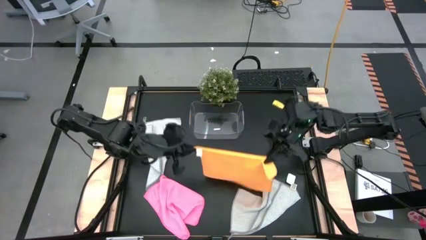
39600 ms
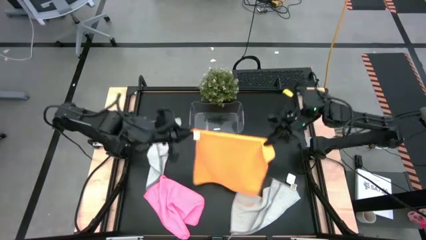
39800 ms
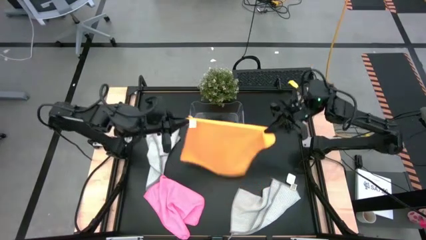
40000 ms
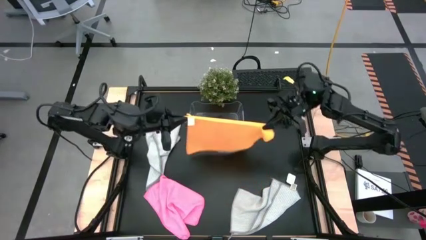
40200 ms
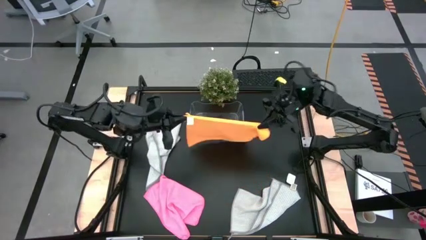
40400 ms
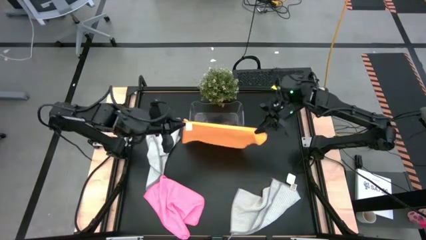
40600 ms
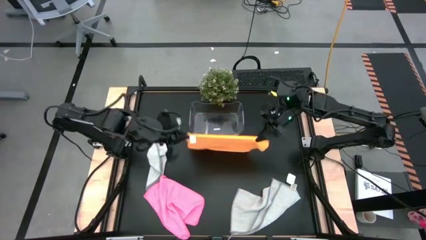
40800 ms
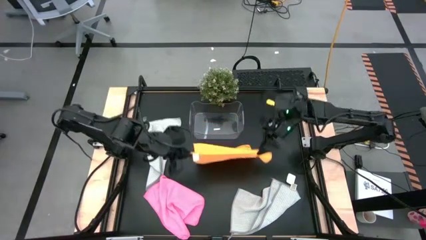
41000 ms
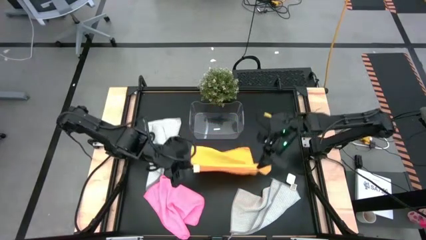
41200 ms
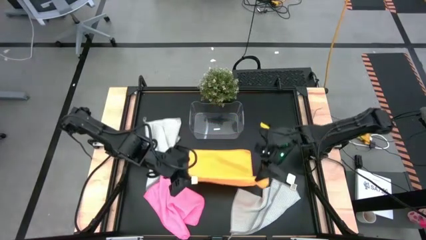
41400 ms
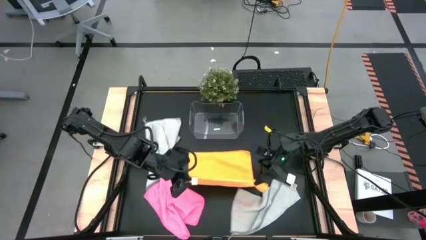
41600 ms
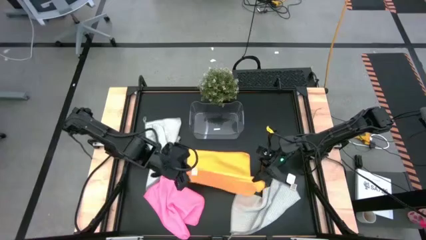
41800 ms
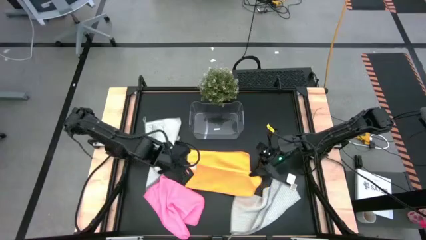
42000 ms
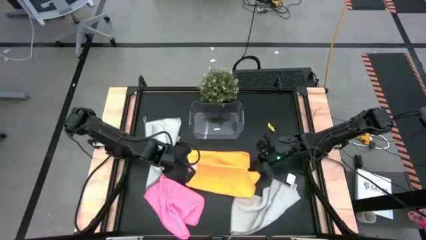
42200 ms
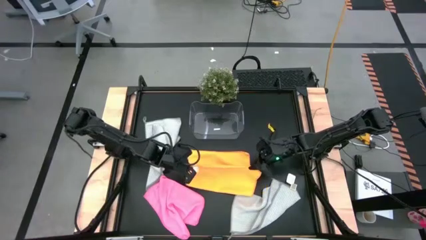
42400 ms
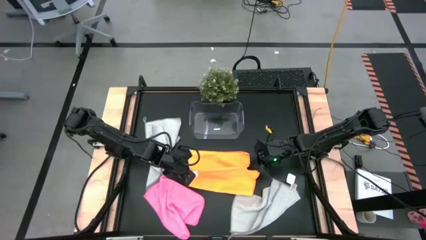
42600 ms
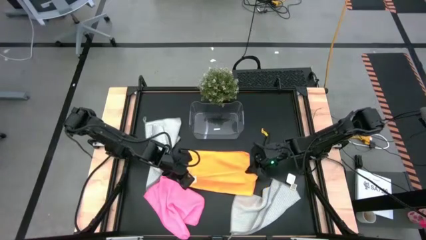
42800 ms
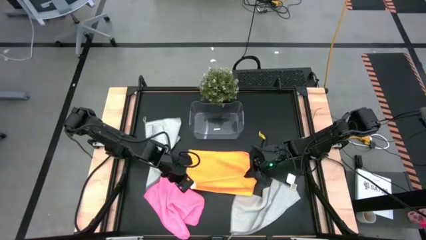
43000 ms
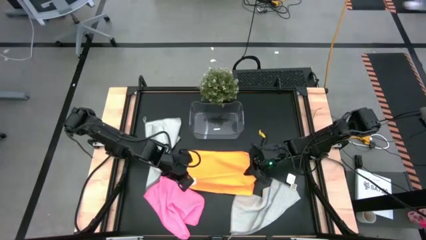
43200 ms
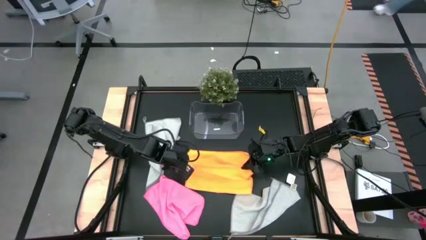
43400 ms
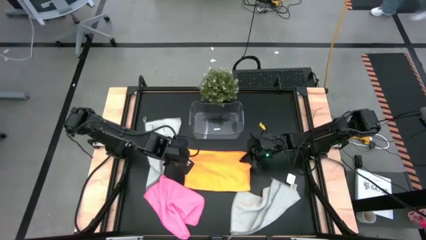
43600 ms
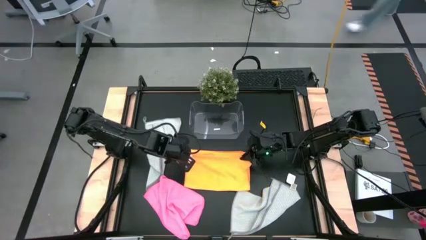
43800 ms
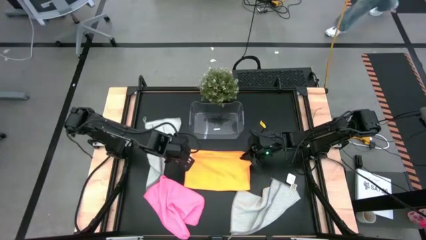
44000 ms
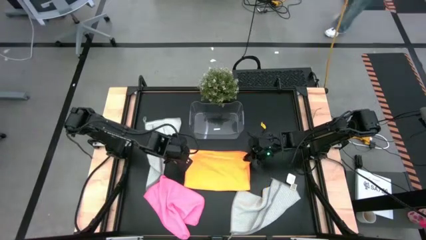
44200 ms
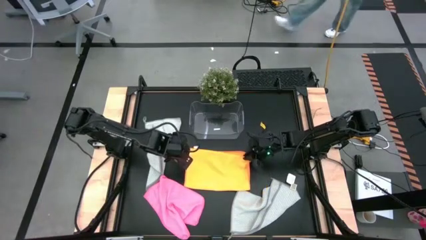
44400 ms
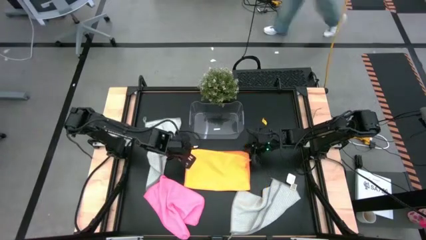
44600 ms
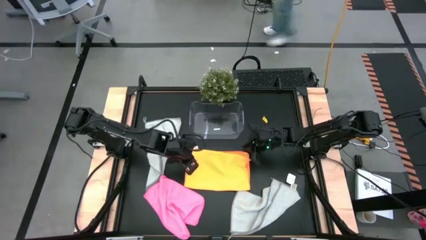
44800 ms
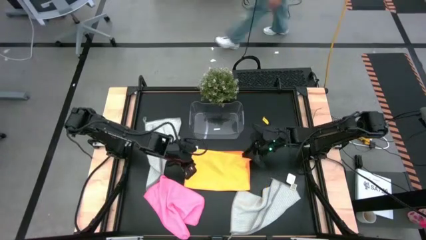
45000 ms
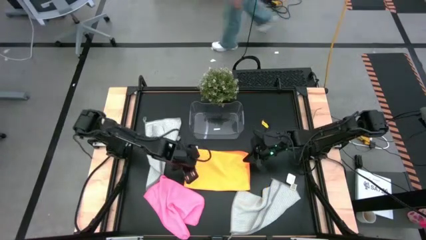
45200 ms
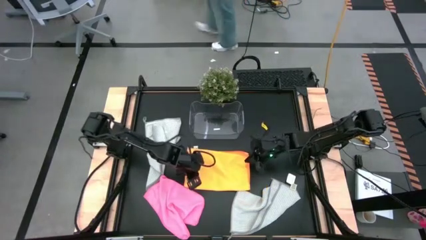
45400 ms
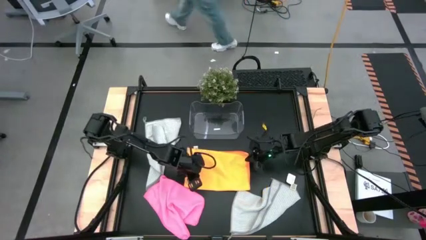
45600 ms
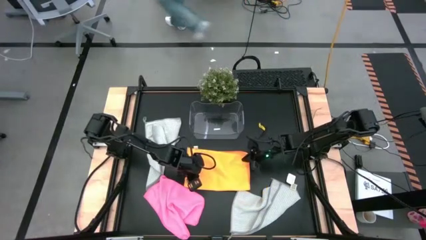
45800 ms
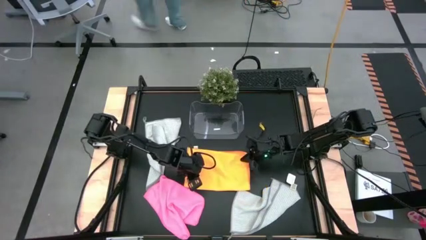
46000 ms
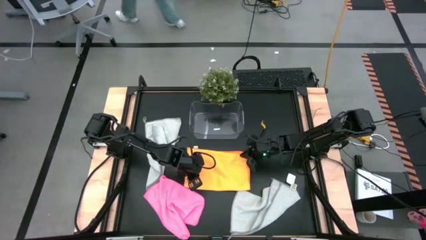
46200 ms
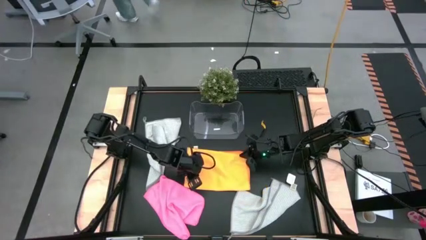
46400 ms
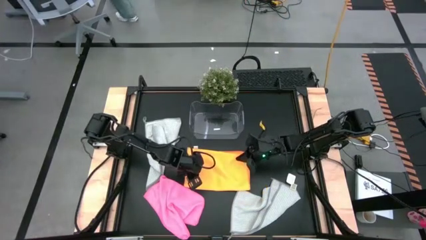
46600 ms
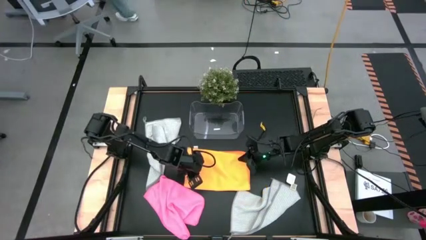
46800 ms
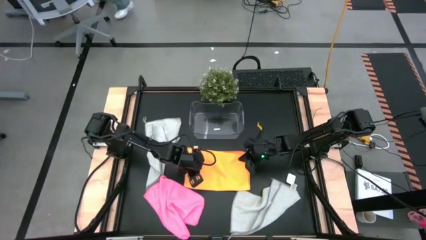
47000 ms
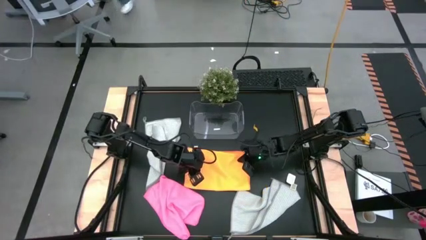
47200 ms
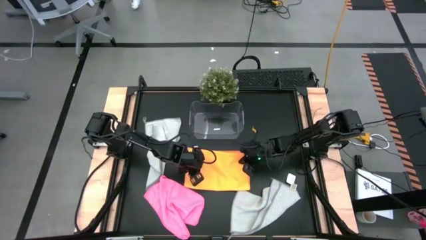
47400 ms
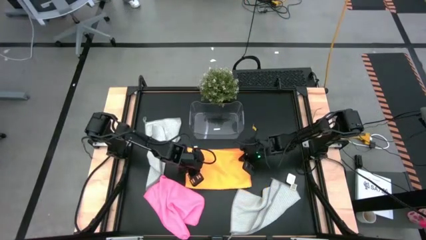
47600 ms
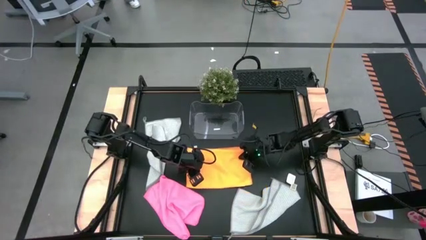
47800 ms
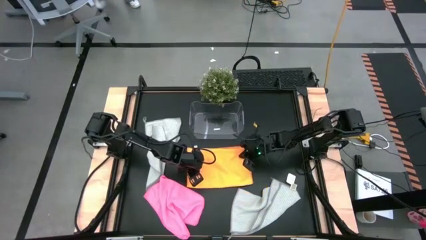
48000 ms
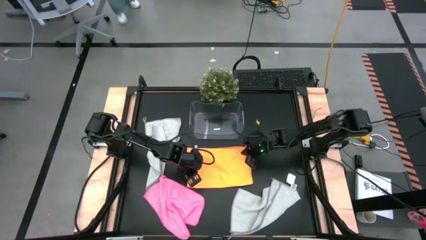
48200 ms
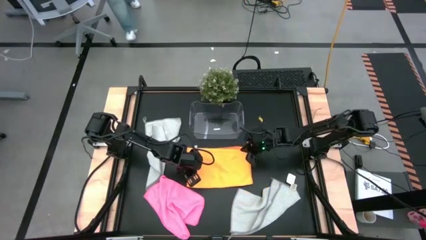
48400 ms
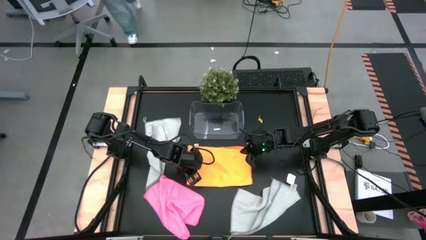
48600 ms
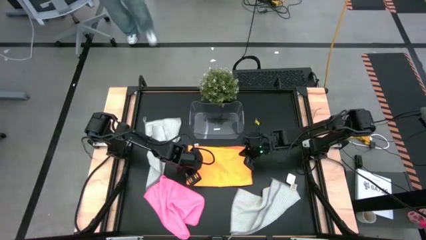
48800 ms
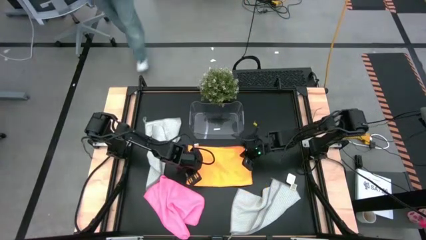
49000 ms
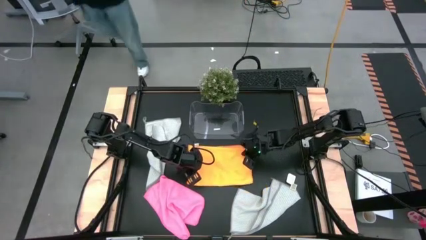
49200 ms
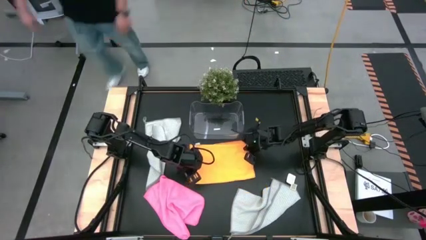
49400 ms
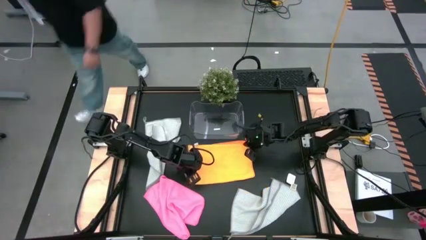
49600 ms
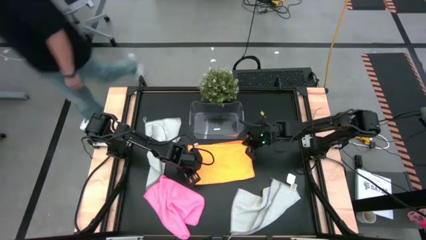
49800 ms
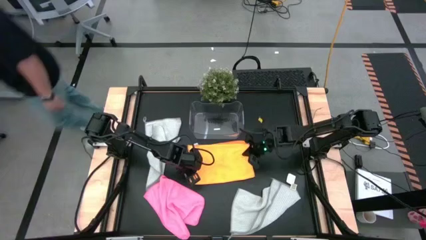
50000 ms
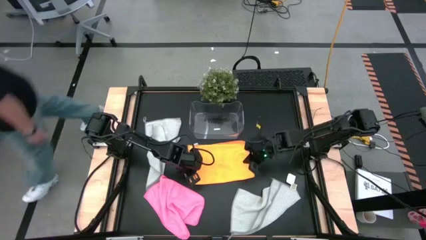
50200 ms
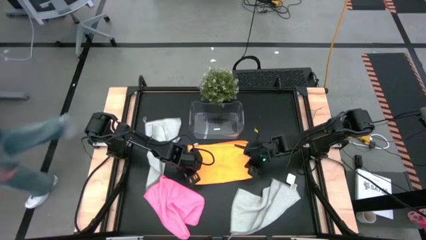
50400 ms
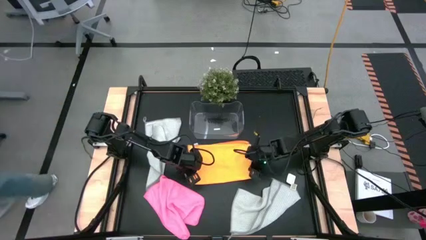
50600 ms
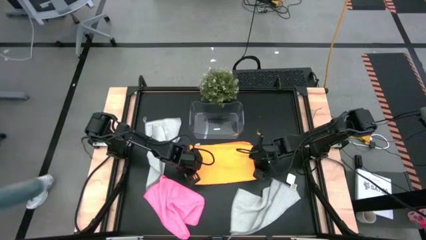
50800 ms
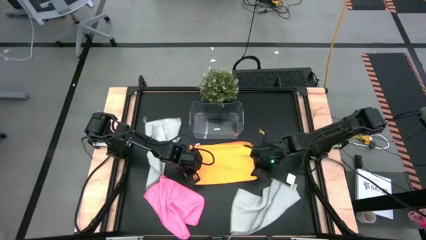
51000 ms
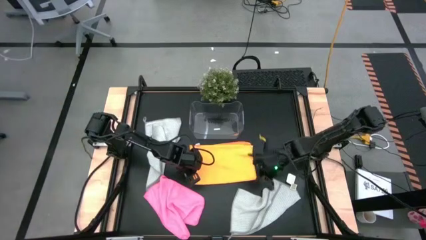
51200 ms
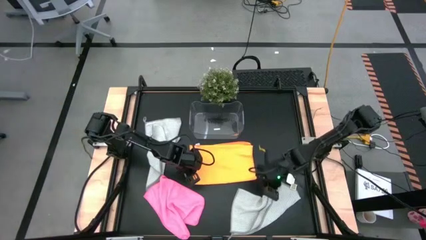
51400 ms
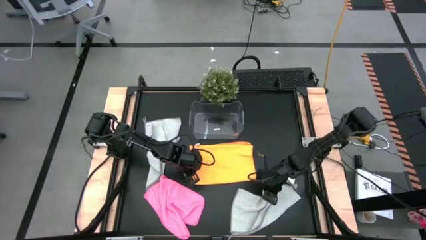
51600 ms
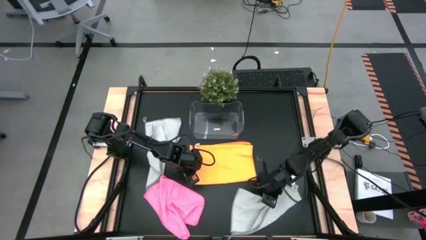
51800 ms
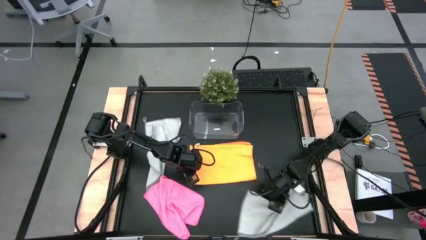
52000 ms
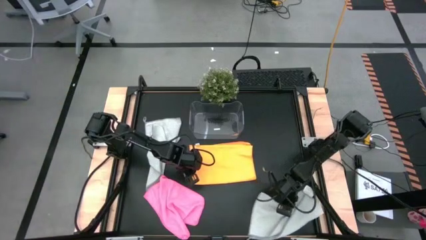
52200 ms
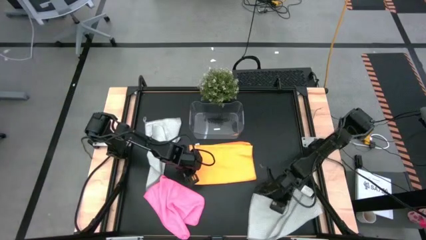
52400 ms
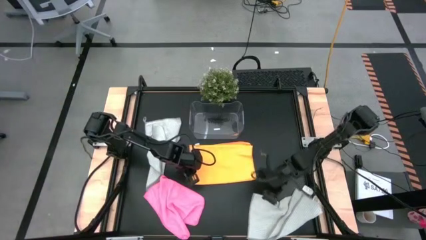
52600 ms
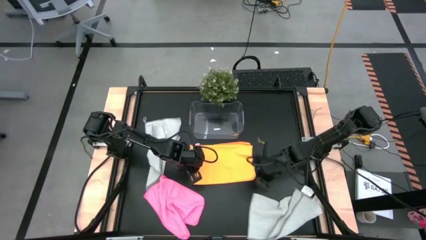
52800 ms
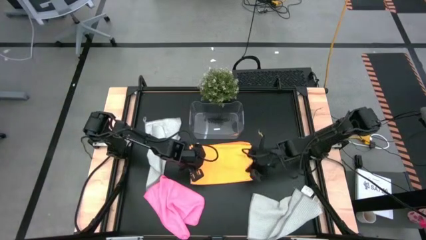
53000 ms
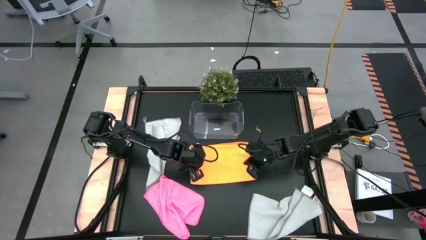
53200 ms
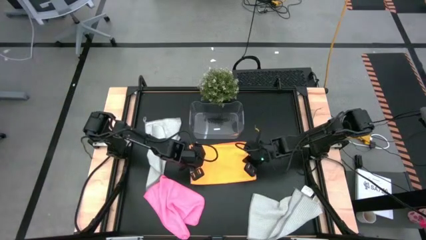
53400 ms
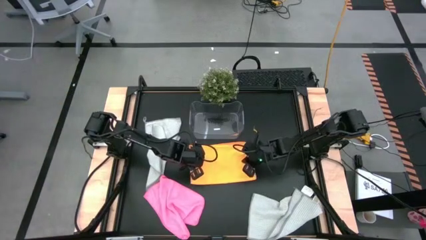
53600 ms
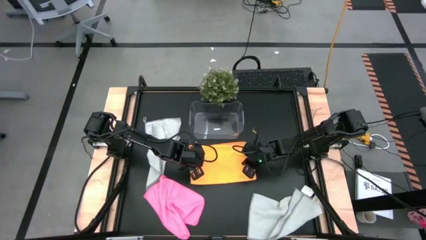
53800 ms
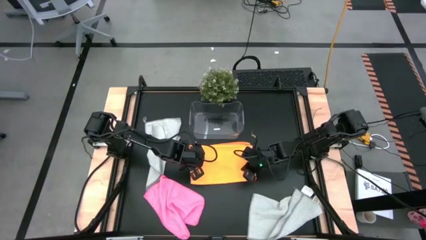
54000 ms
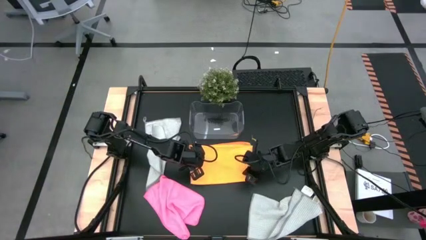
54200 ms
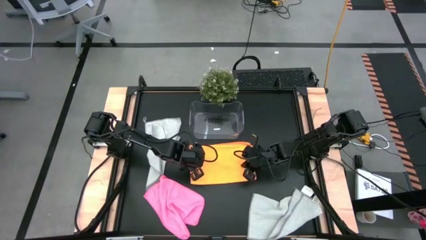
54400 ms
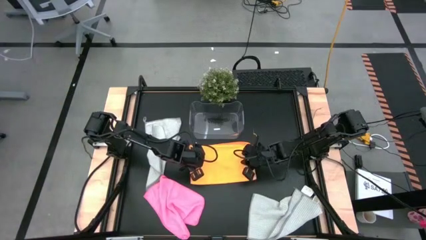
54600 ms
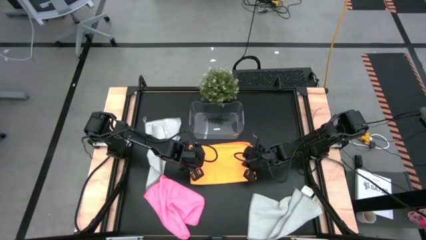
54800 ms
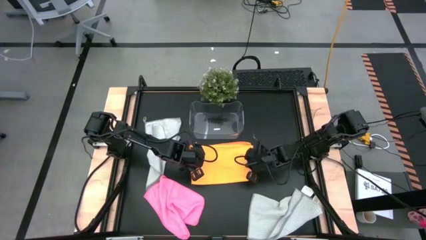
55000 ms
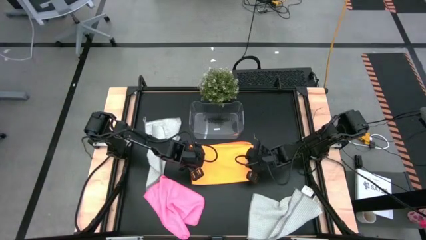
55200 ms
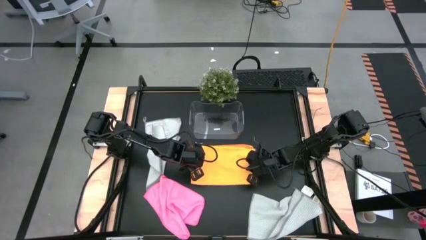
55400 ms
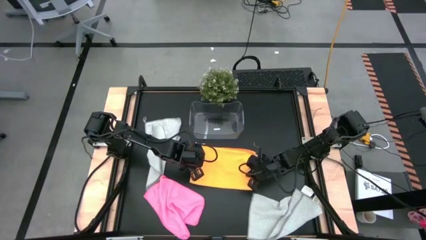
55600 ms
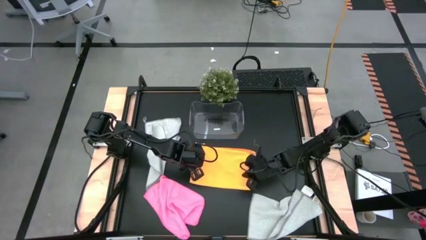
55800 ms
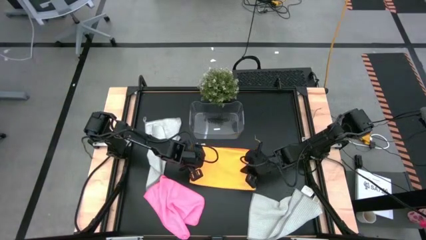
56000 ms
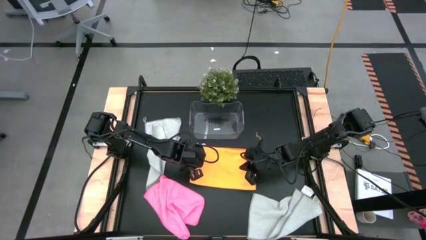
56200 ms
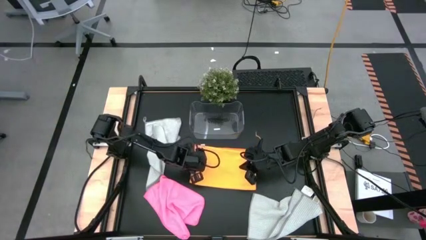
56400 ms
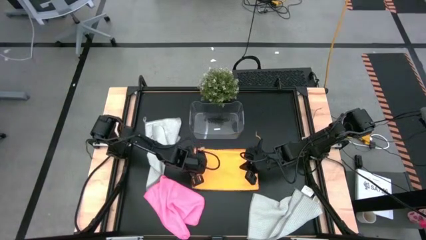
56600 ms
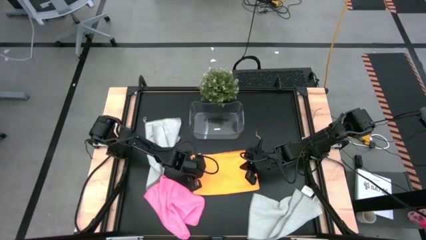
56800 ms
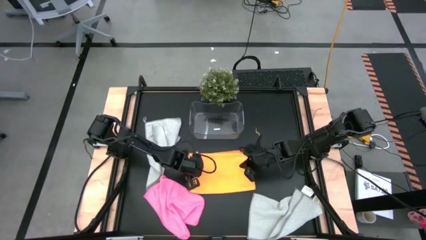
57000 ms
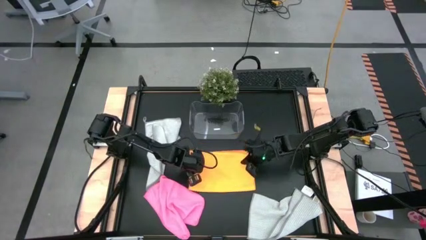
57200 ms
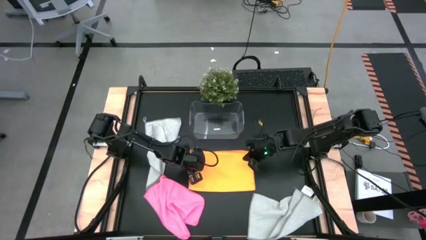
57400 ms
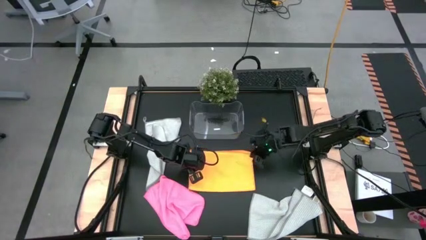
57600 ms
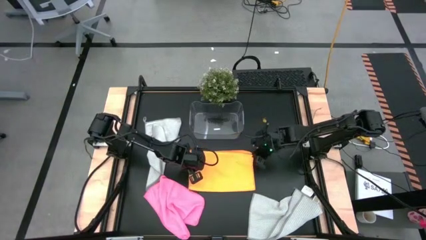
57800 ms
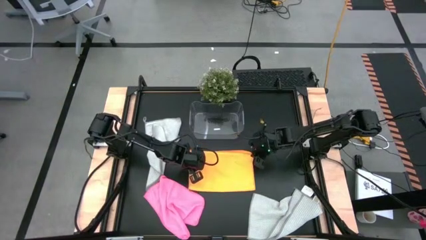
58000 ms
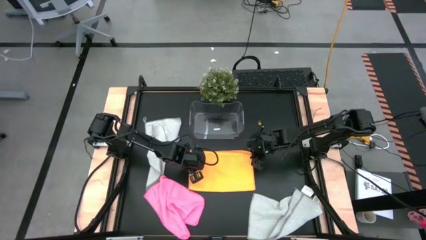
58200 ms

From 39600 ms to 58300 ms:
Task: Fold microfiber towels
Fold the orange microfiber towel on the table
